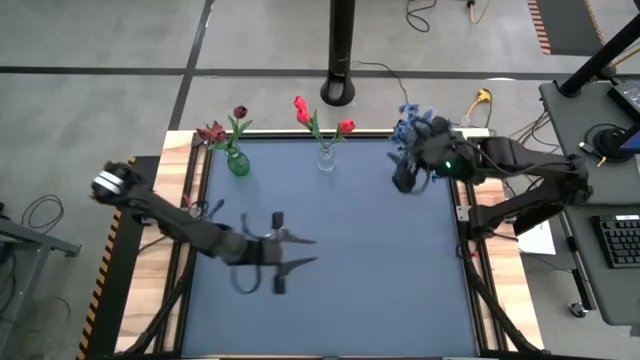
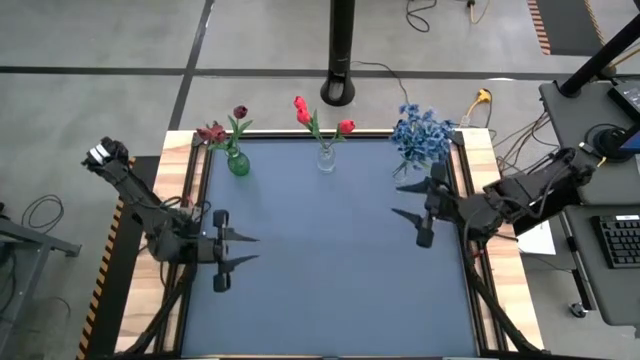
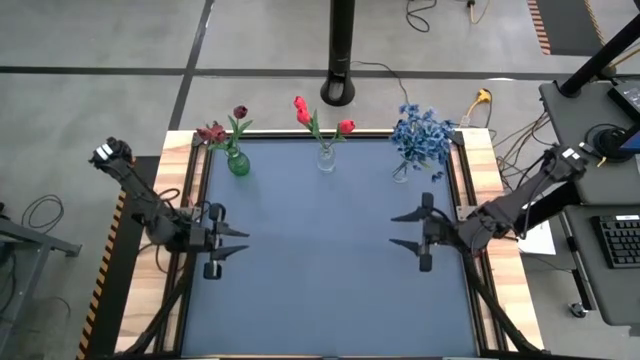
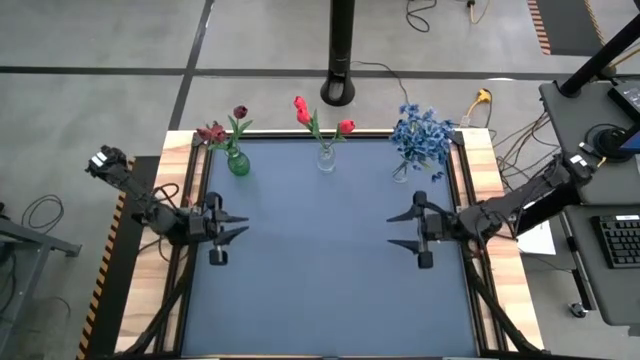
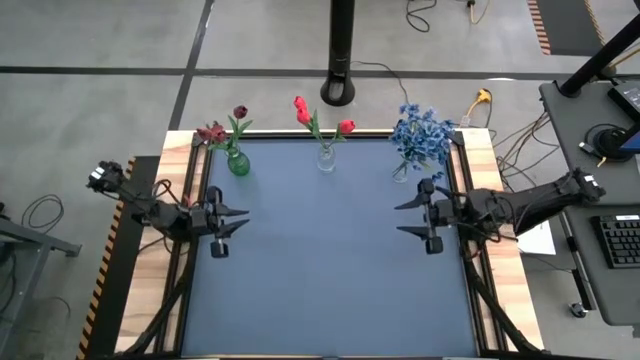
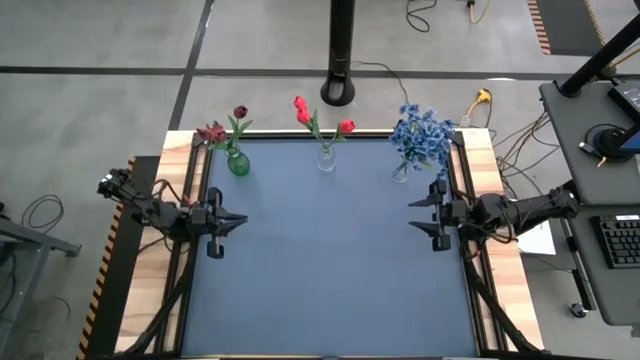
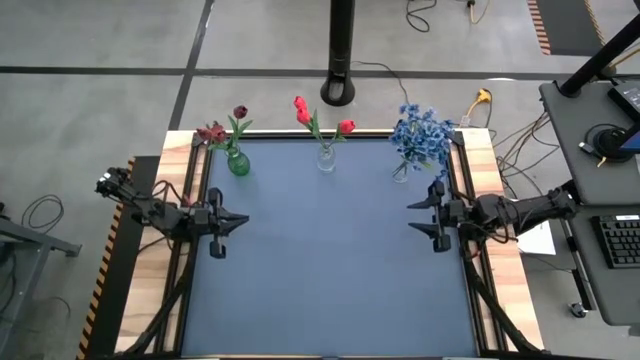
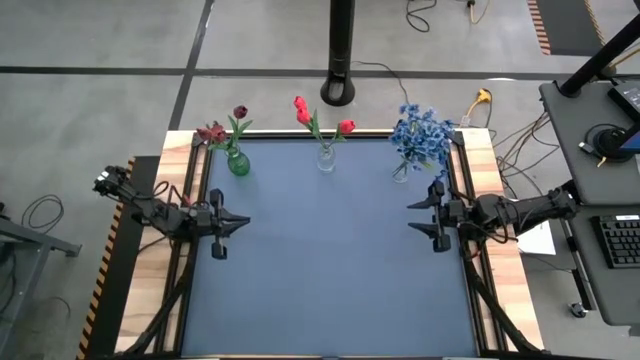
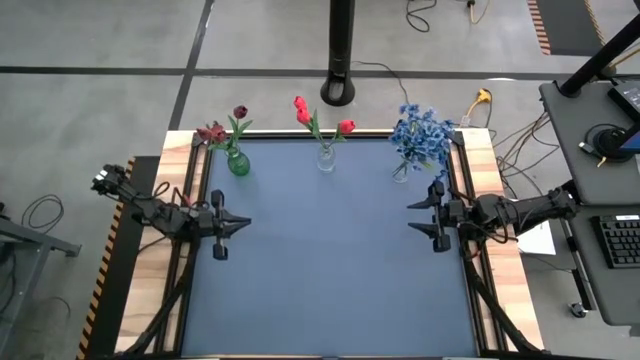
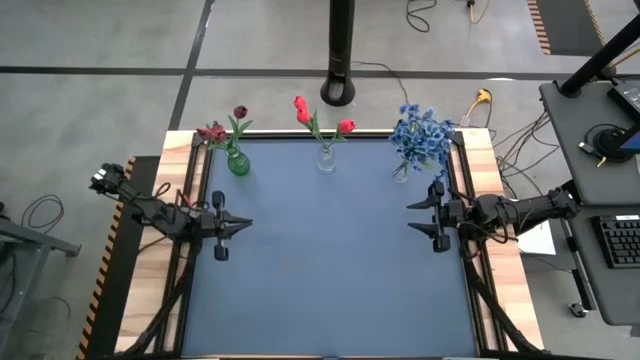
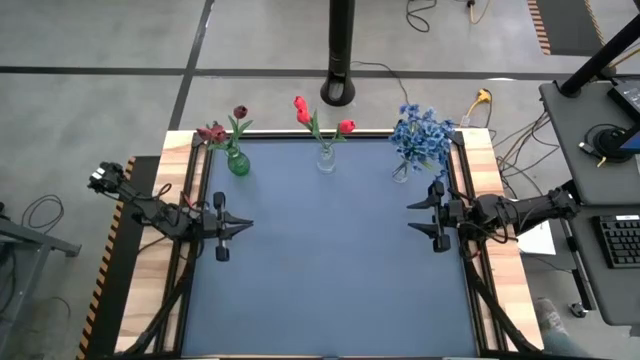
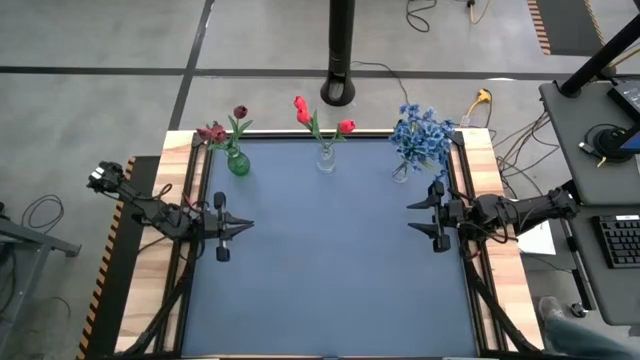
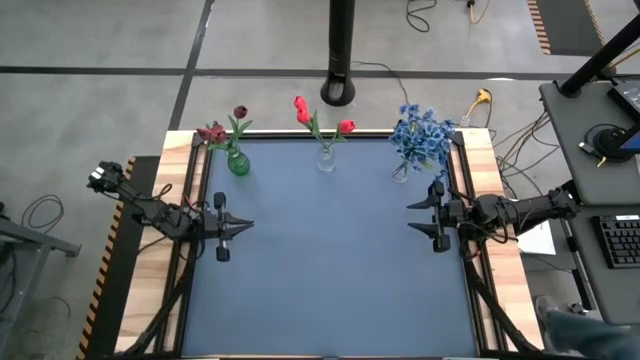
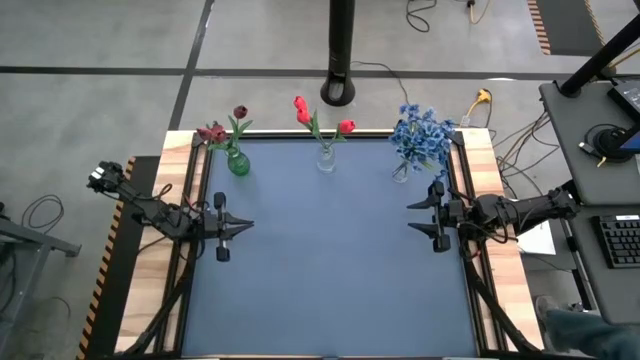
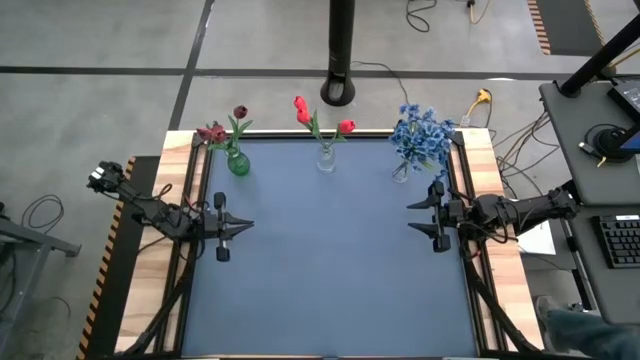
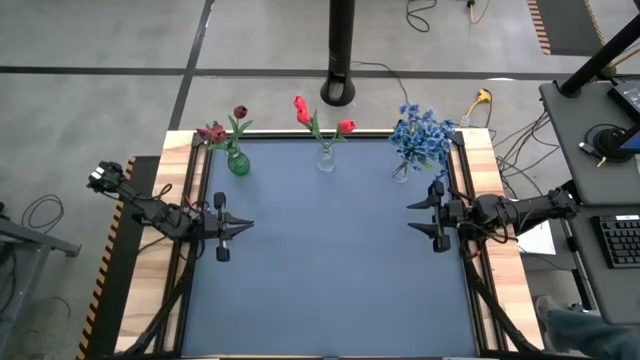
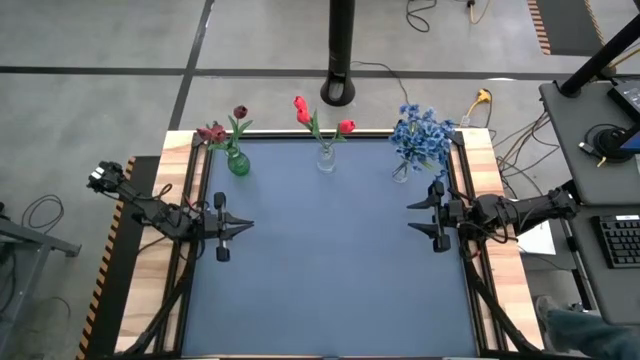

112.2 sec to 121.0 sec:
Task: Sort flowers into vase by color
Return to Home Position

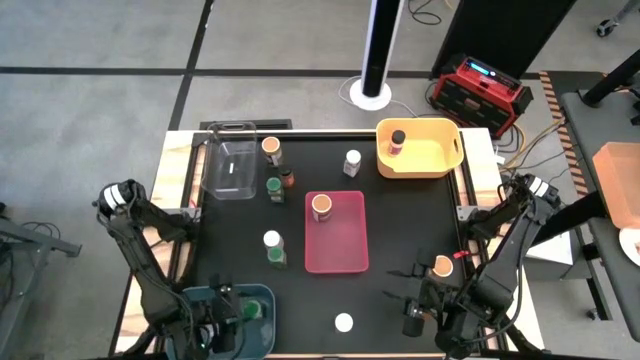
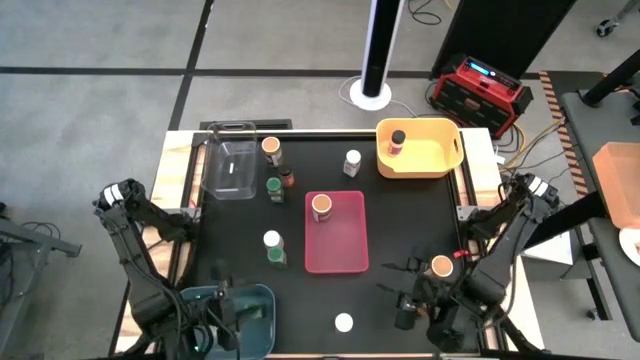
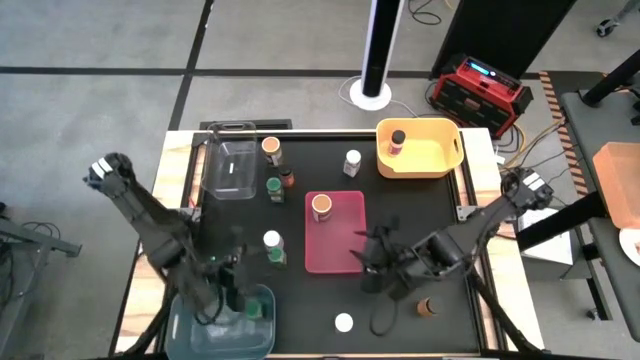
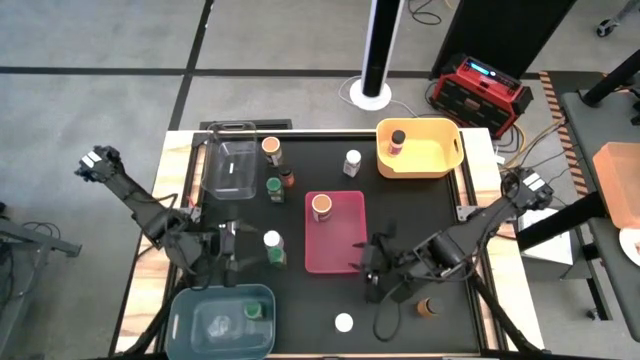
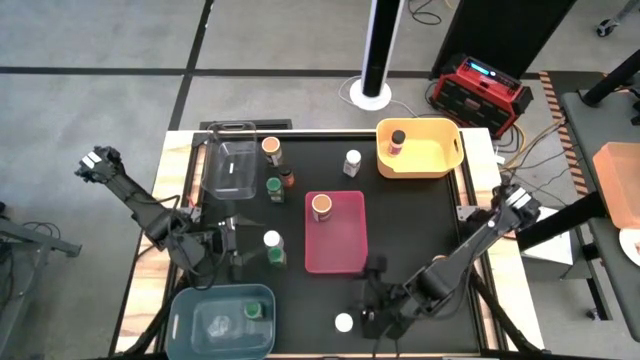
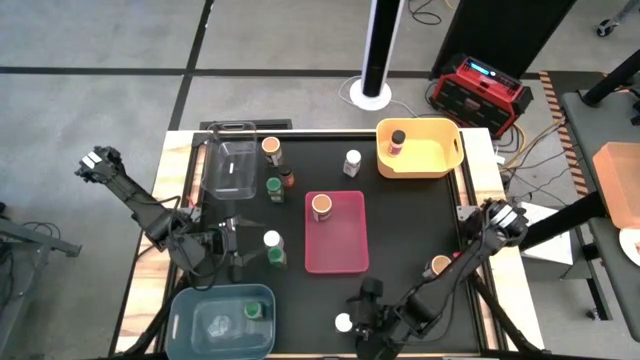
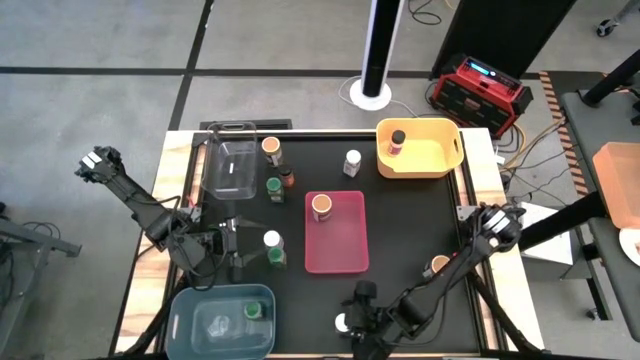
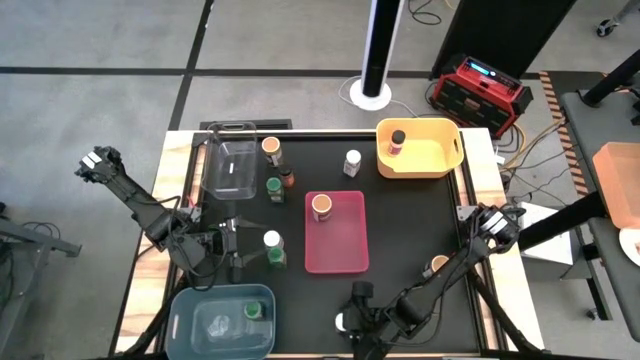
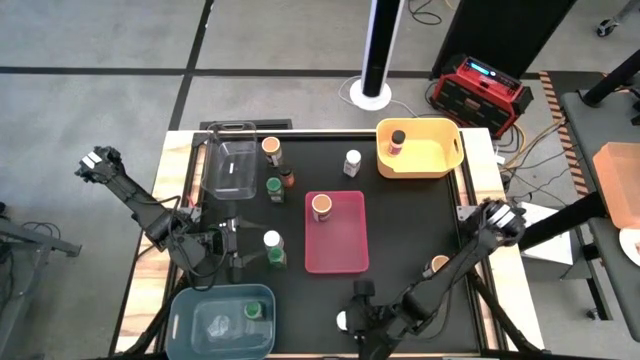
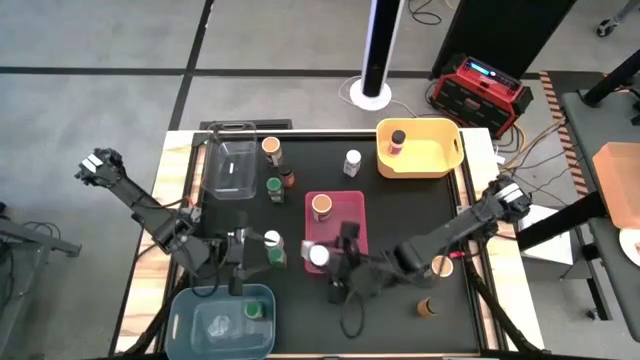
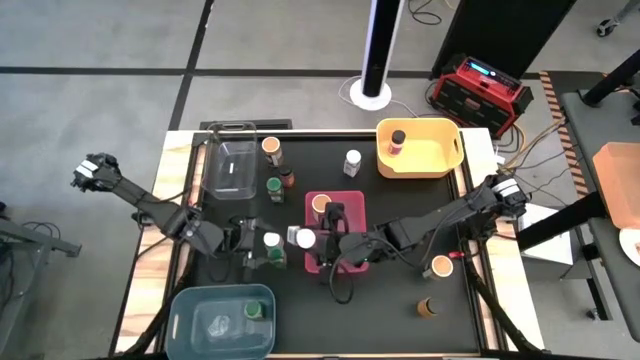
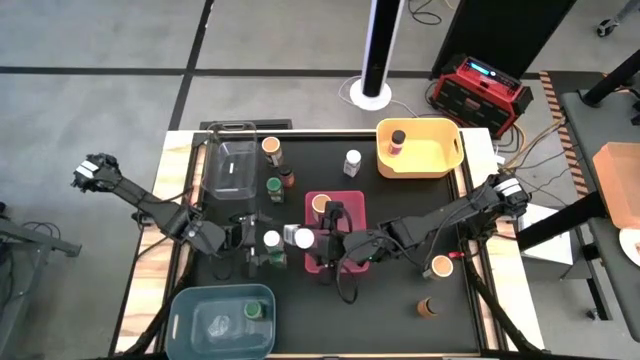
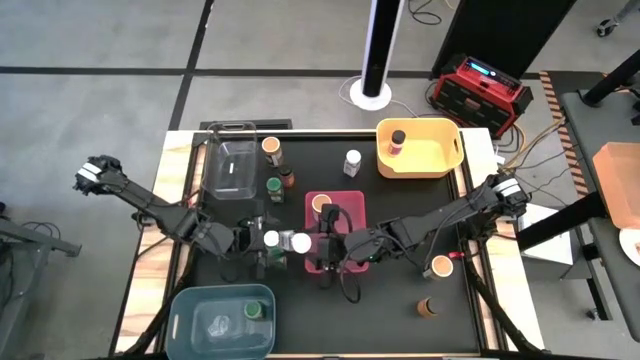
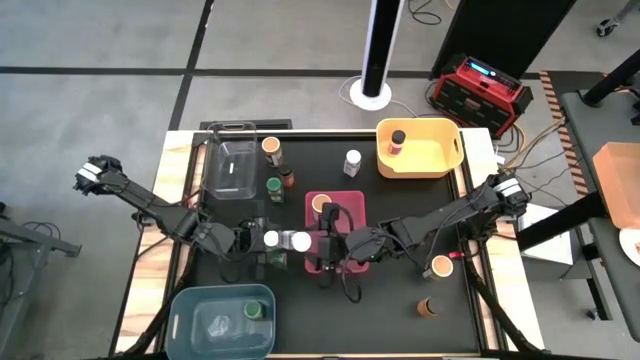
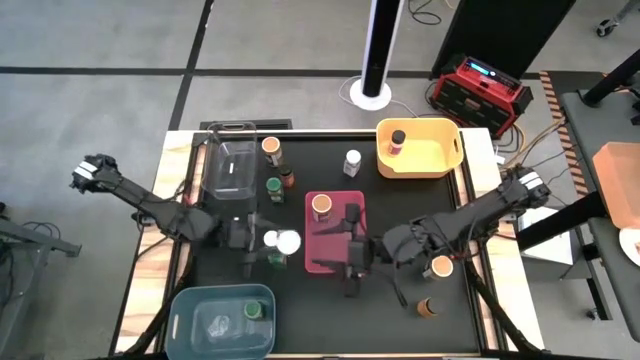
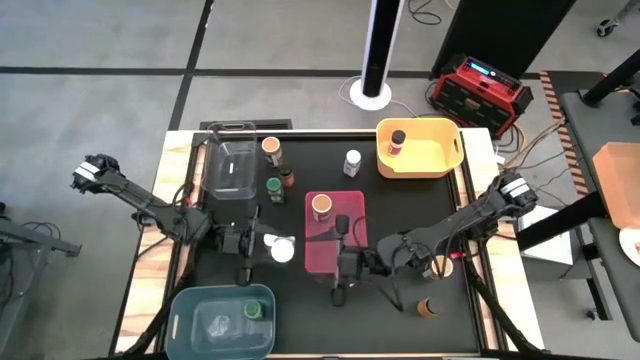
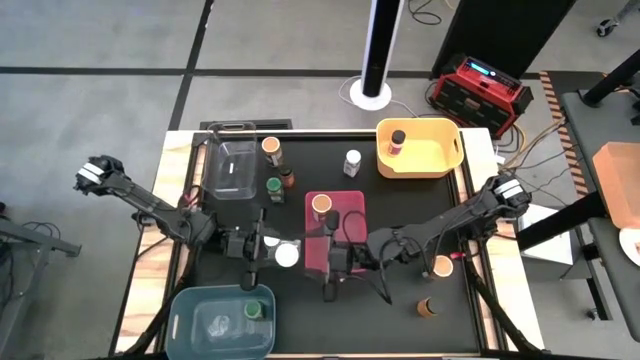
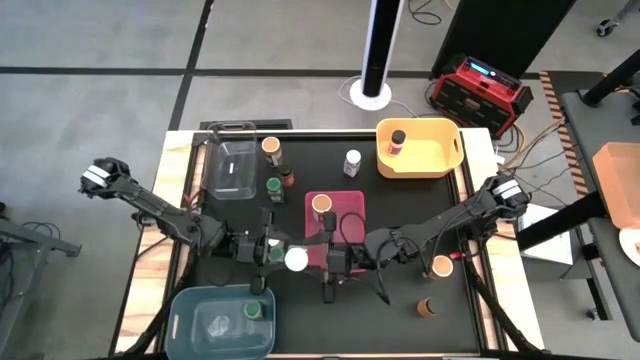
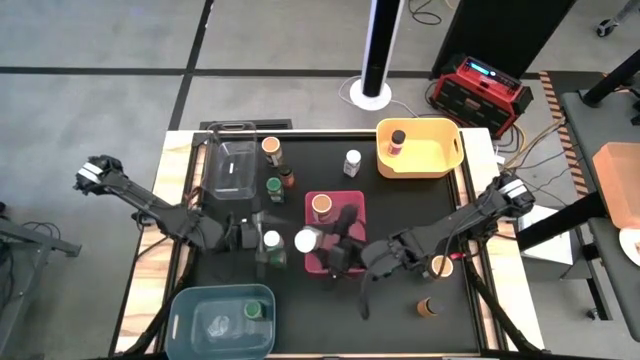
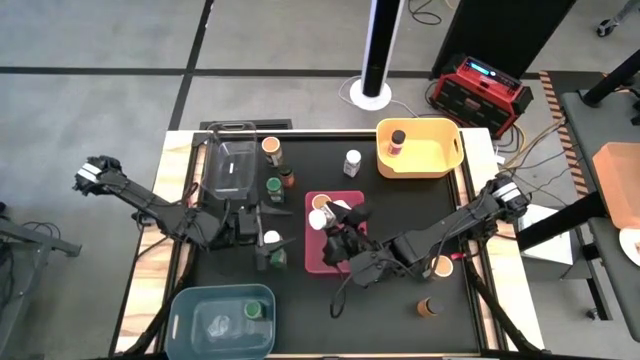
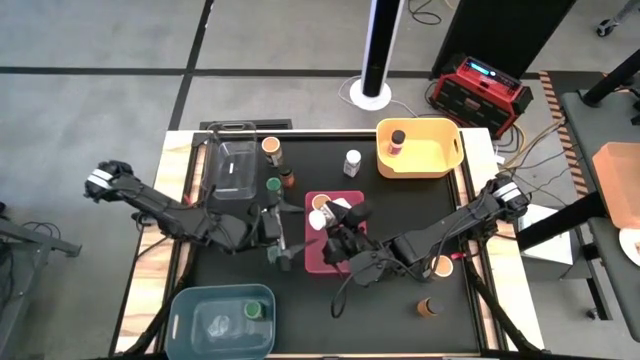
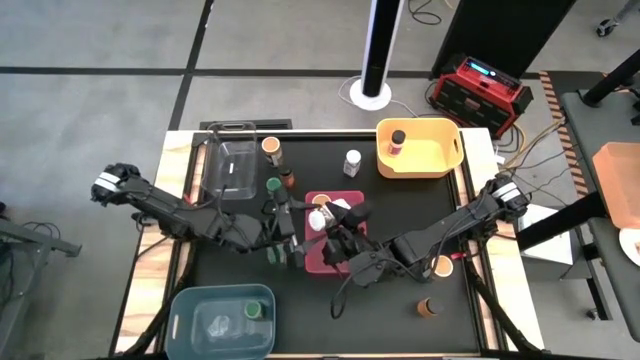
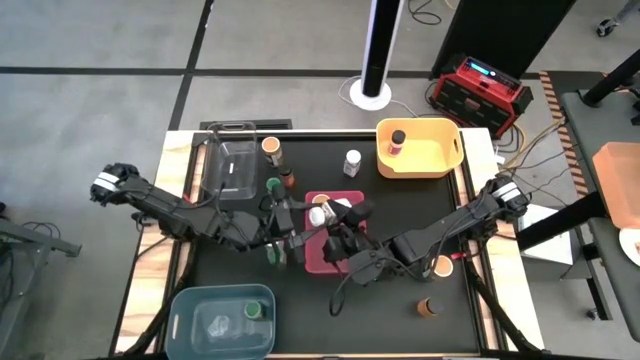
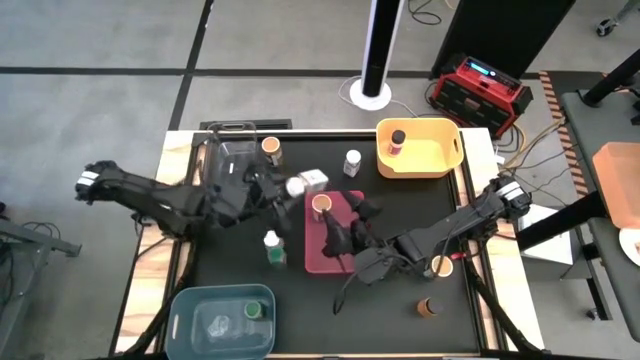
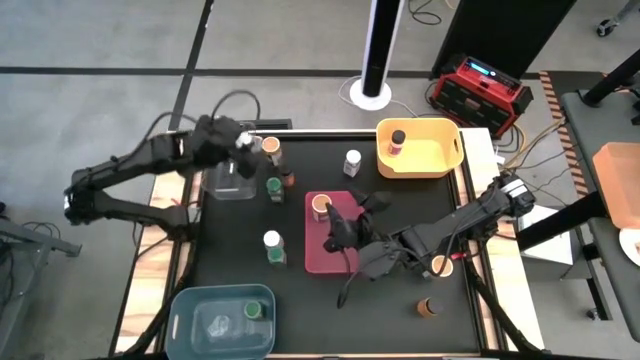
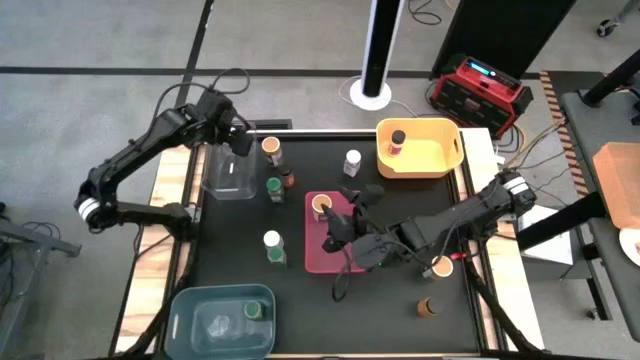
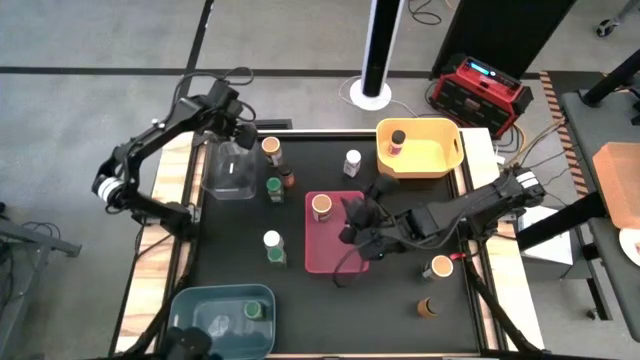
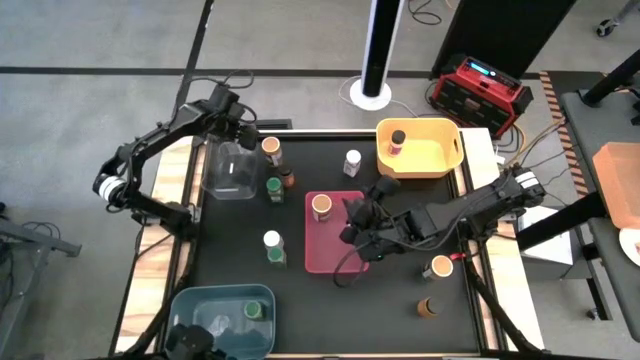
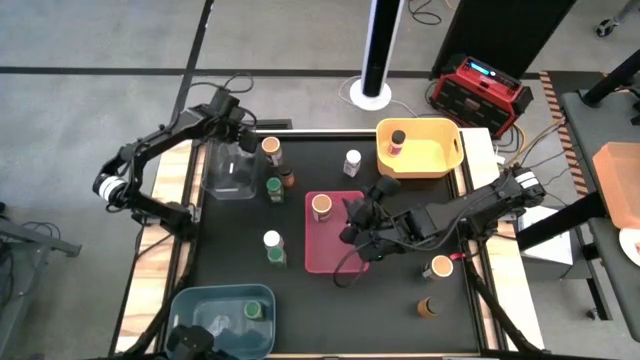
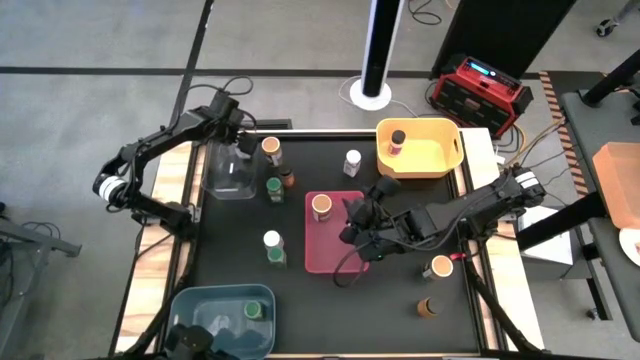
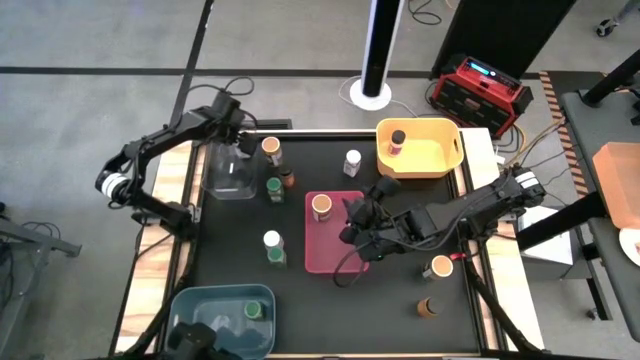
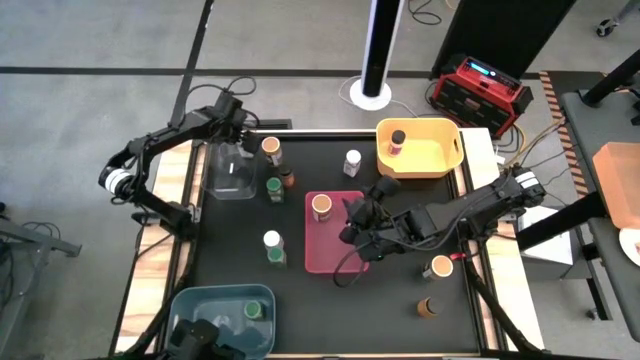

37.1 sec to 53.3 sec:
Task: Sort spices by type
Put the bottom white seasoning bottle into the transparent bin
